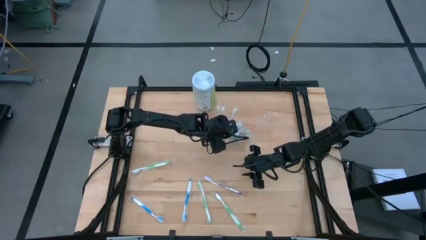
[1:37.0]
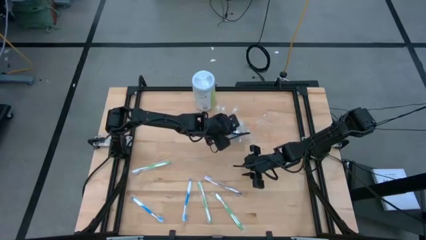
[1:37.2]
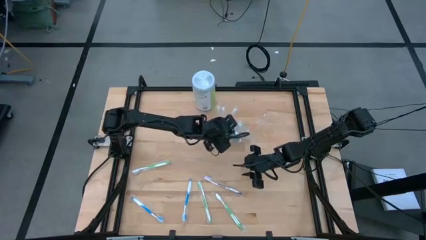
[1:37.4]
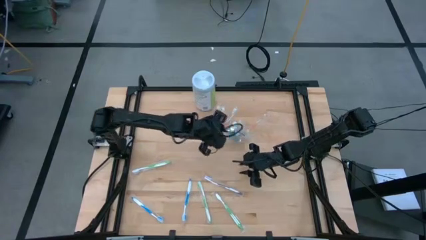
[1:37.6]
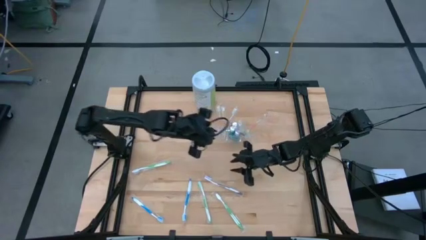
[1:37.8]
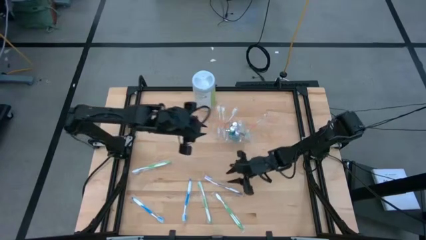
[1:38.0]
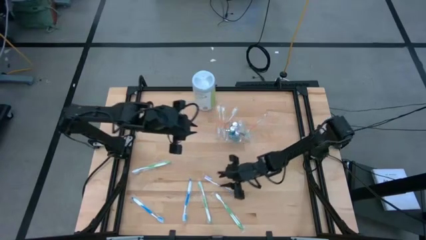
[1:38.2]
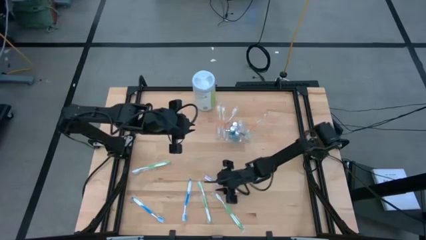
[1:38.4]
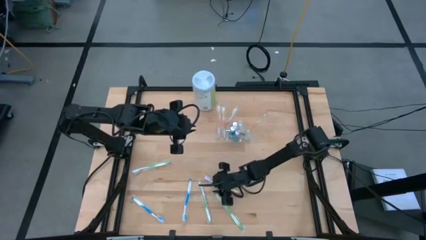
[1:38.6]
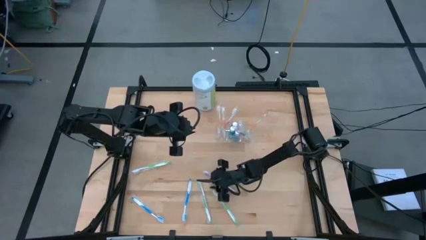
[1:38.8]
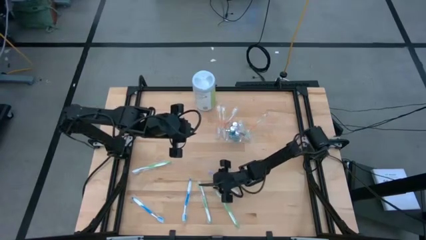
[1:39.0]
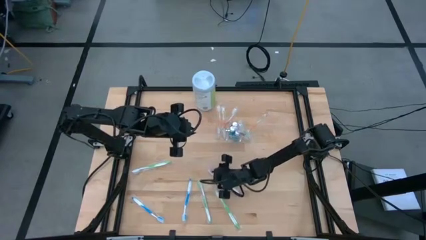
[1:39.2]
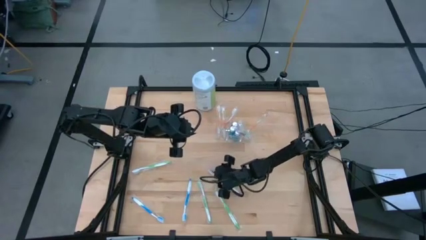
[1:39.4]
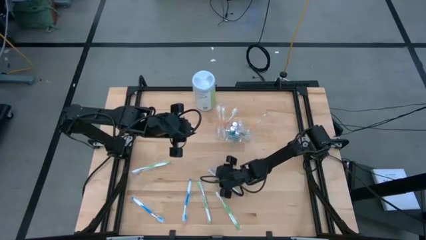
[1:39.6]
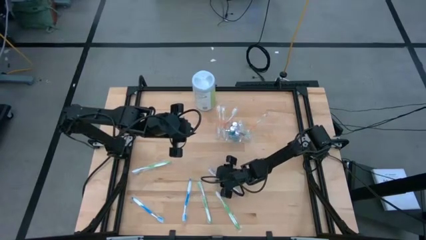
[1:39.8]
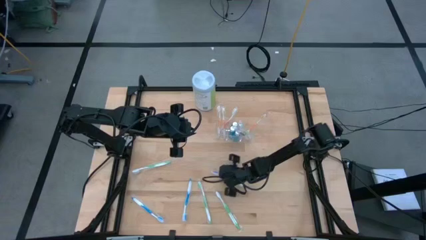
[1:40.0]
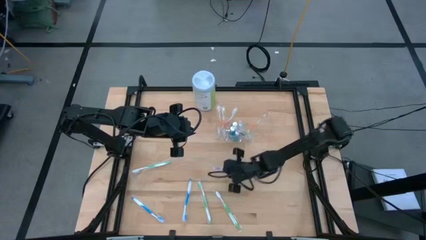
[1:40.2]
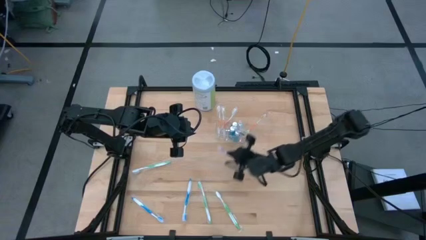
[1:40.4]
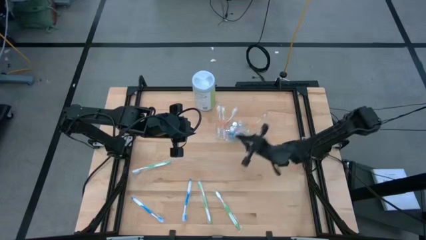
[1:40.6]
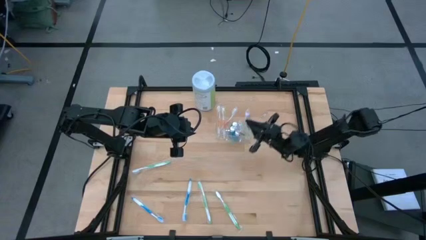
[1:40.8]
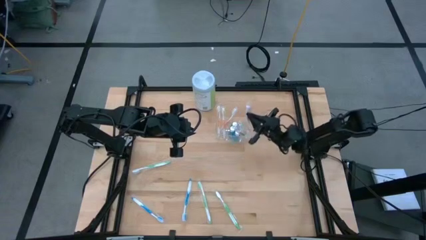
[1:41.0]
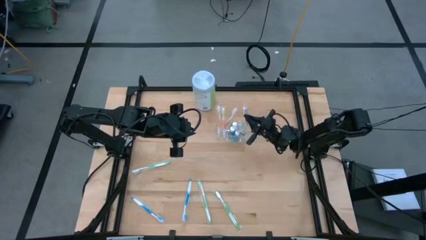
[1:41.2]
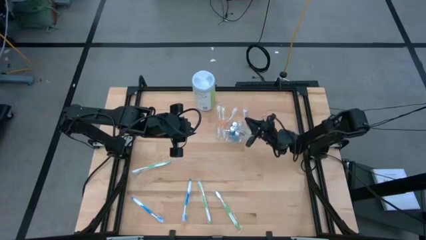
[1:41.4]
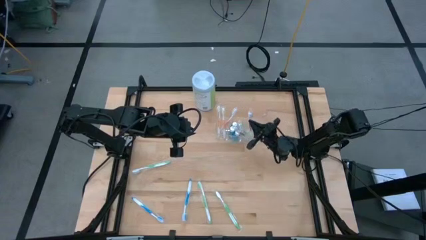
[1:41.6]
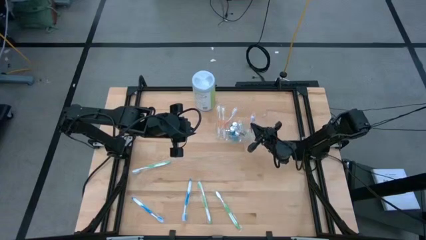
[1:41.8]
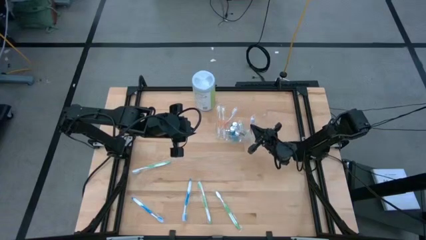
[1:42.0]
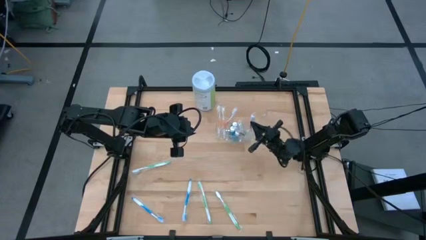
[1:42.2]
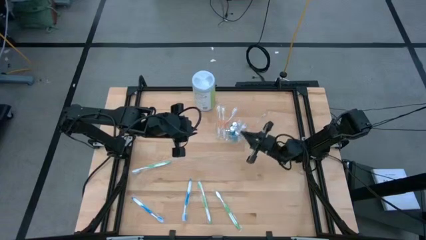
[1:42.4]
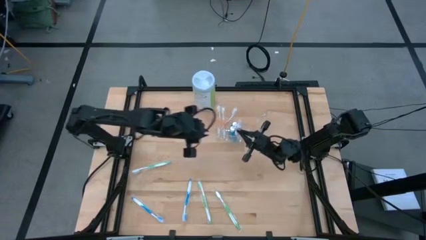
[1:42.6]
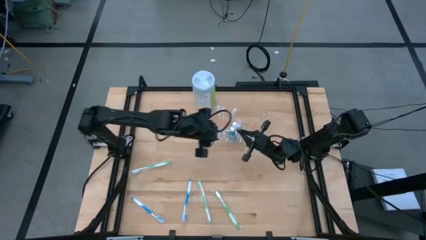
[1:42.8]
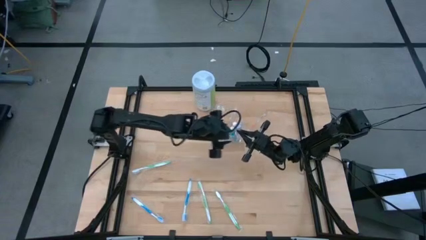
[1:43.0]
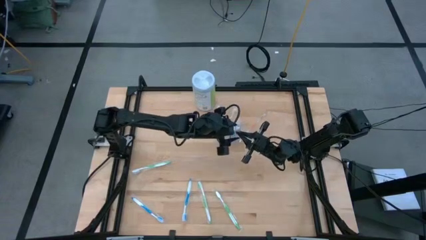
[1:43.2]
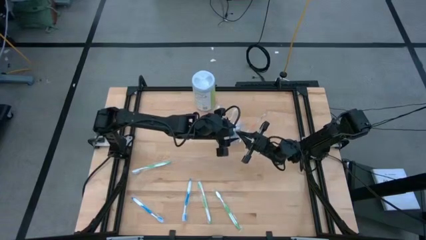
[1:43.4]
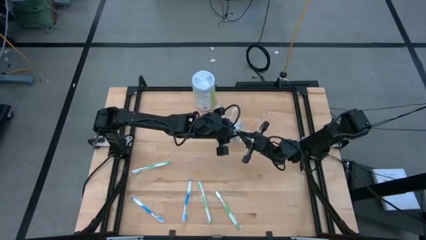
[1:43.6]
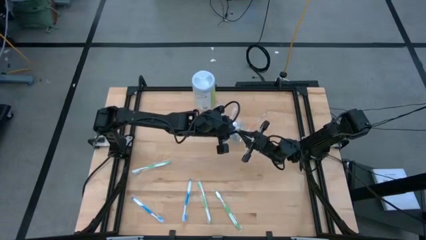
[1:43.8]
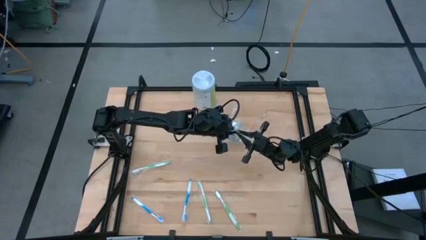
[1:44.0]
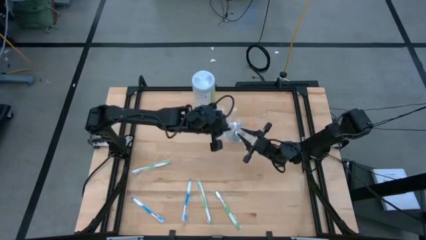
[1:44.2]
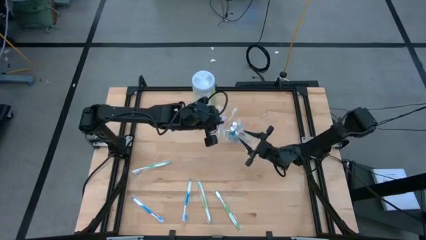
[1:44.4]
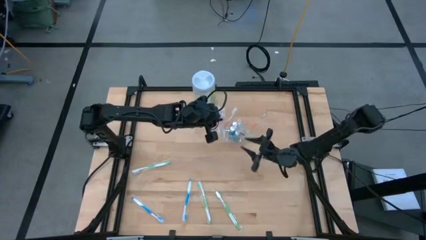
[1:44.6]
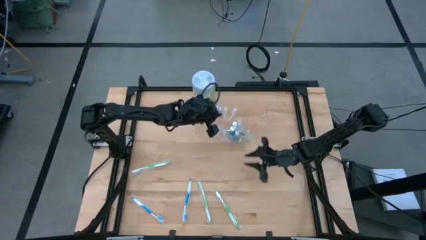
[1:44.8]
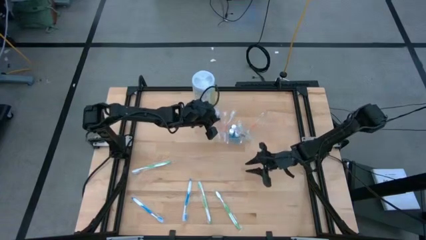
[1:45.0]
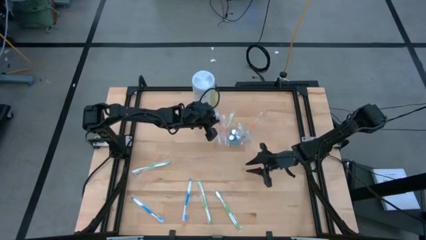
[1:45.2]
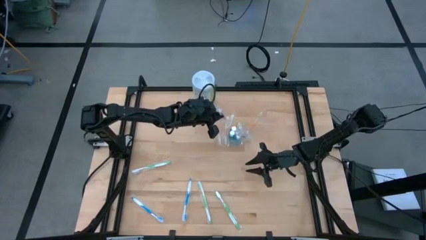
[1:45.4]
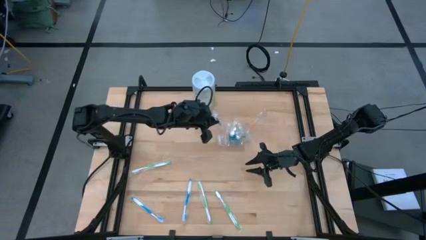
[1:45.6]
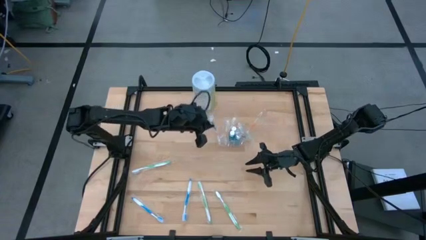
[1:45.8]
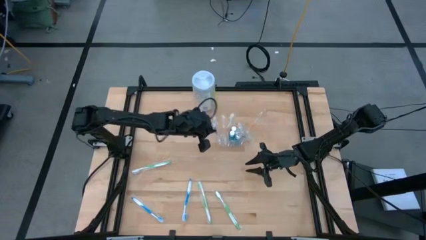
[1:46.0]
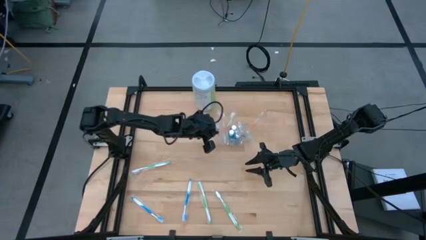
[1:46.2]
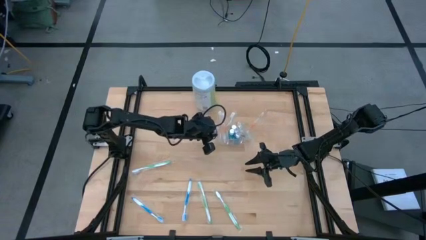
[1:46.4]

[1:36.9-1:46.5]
Task: Pick & Place toothbrushing station
Put the purple toothbrush into the transparent organizer

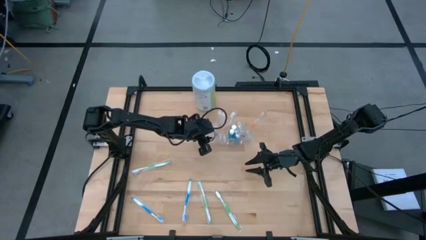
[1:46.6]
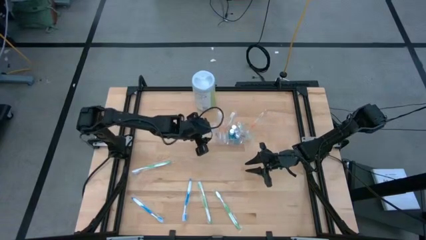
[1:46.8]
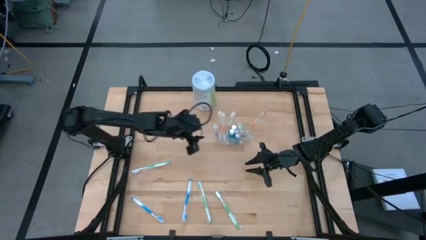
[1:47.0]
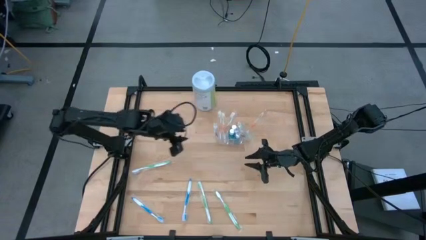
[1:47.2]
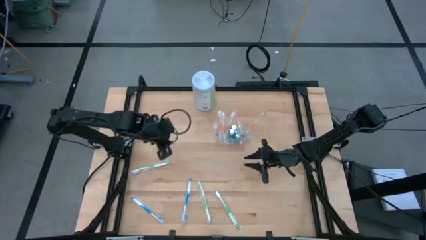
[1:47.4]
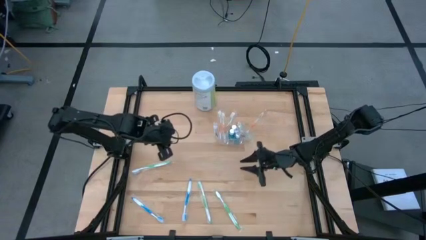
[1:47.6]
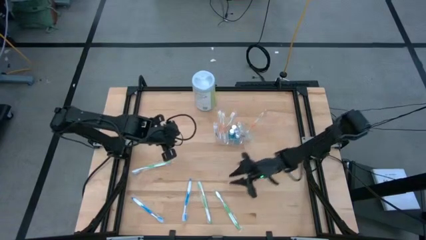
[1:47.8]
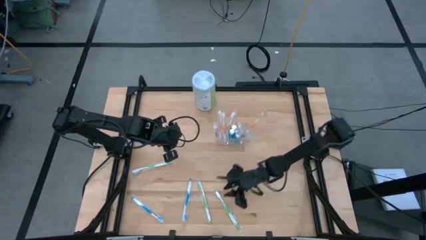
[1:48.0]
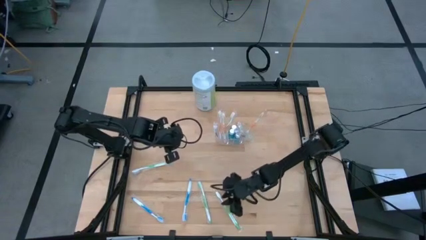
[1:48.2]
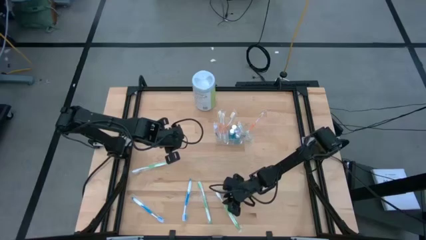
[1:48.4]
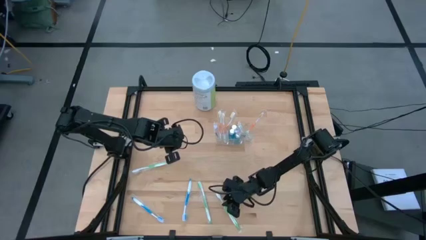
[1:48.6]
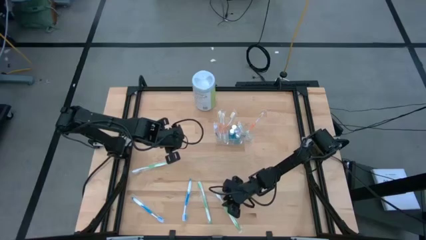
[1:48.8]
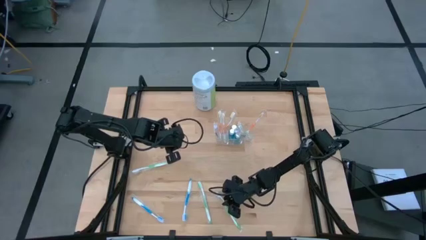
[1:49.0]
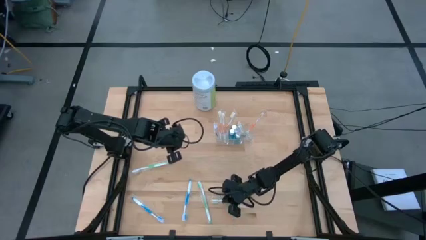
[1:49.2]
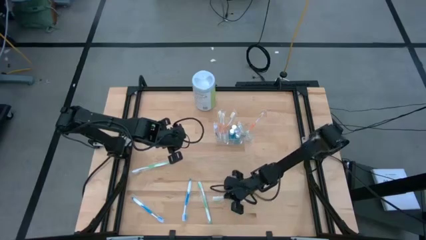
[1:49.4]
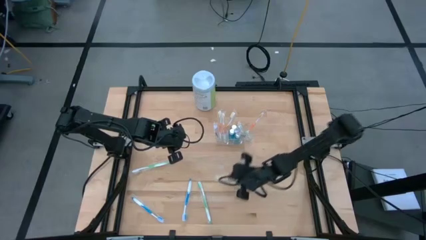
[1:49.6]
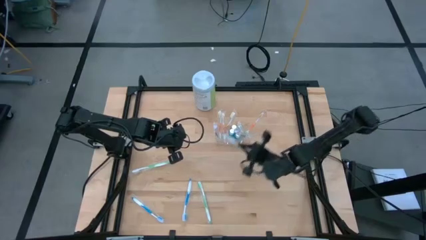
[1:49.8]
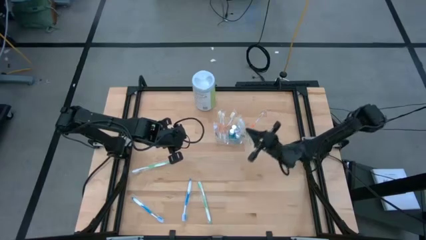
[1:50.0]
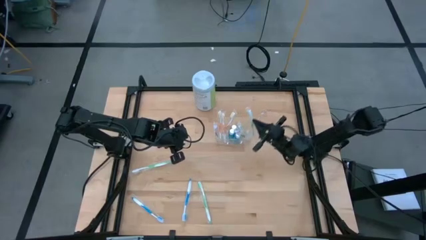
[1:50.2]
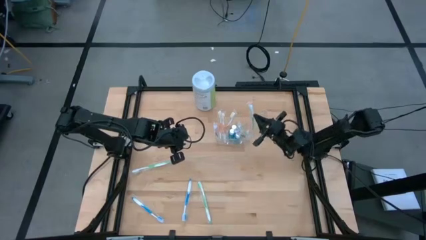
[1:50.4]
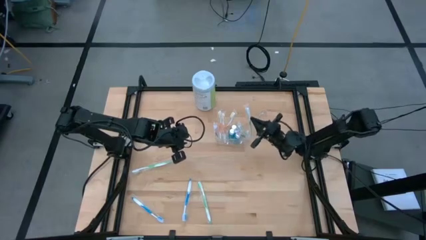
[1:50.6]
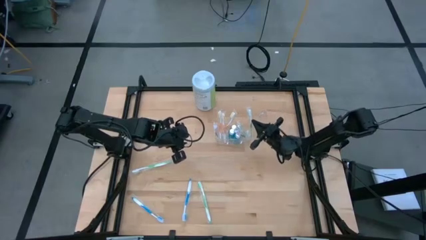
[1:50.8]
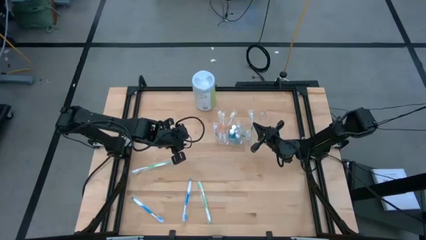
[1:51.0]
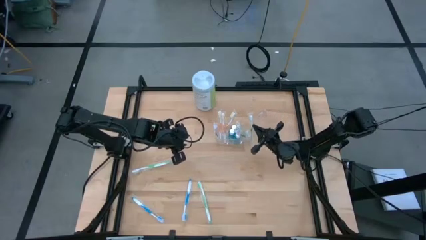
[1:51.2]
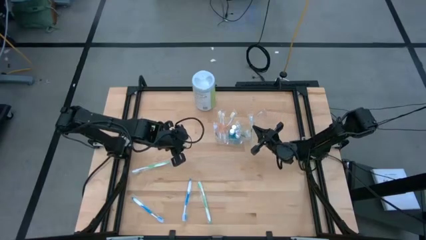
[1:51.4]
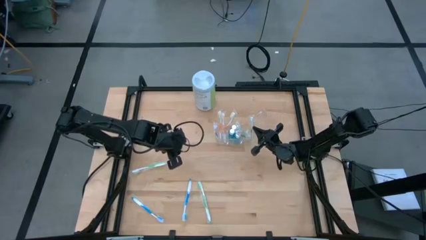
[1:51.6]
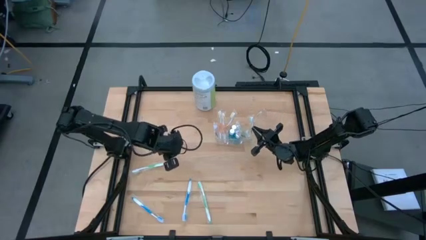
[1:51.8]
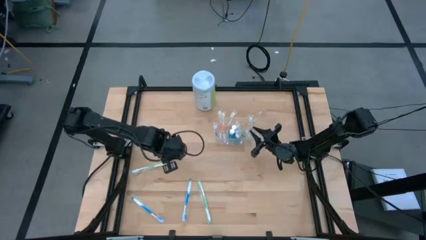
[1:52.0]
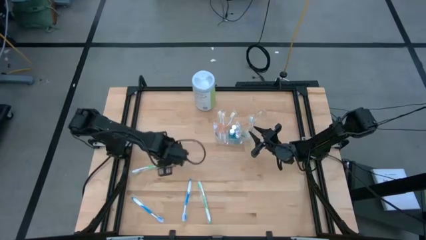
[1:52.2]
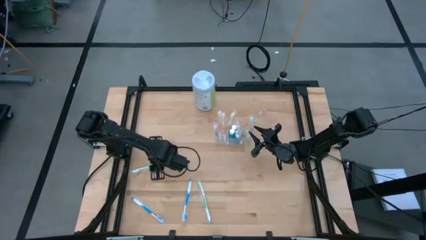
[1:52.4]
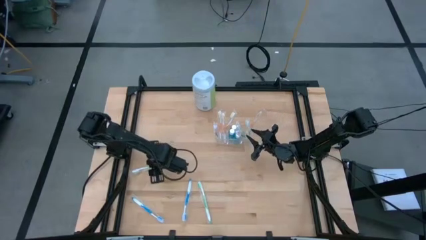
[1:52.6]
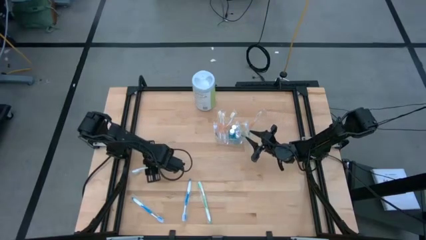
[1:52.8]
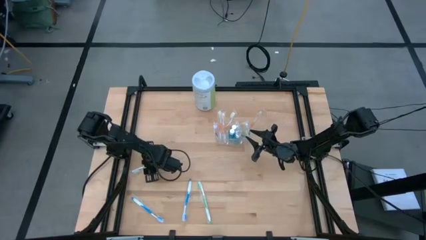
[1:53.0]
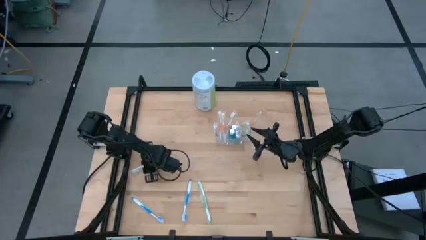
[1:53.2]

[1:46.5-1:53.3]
Put the green toothbrush into the transparent organizer
